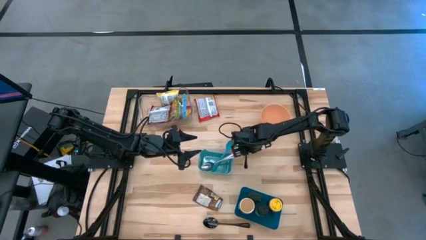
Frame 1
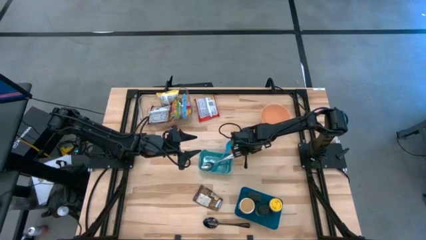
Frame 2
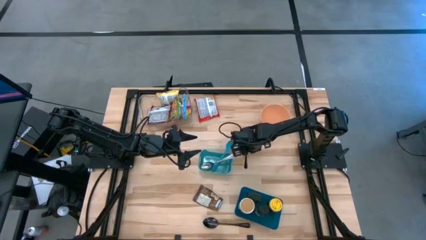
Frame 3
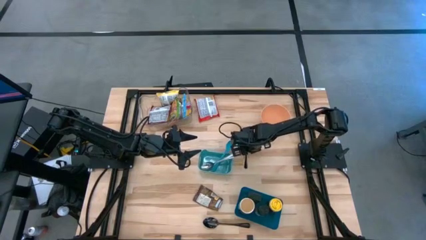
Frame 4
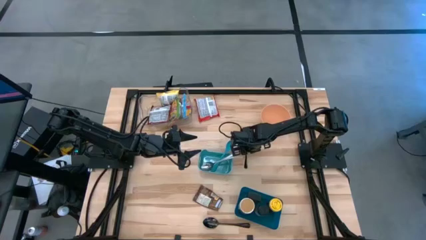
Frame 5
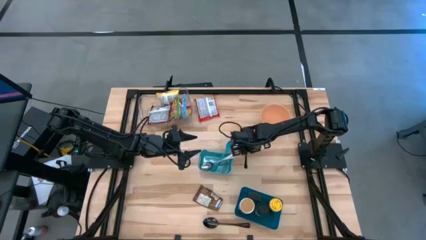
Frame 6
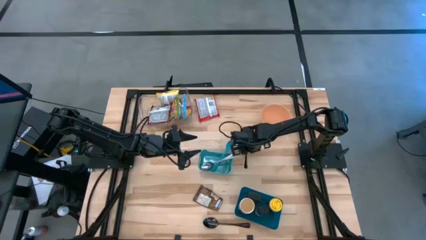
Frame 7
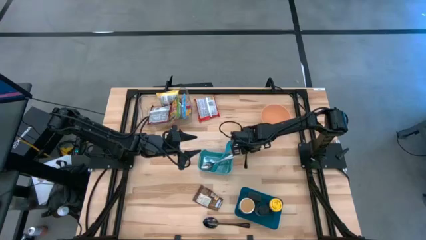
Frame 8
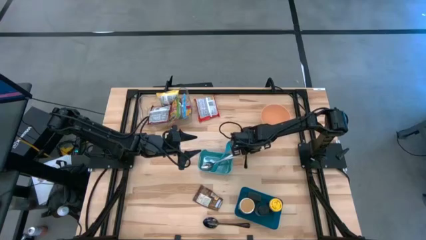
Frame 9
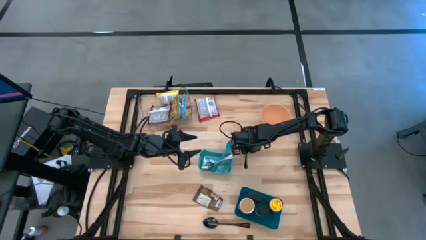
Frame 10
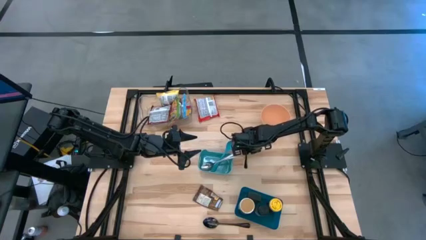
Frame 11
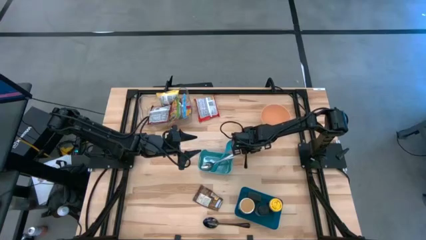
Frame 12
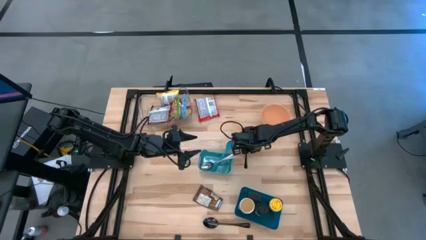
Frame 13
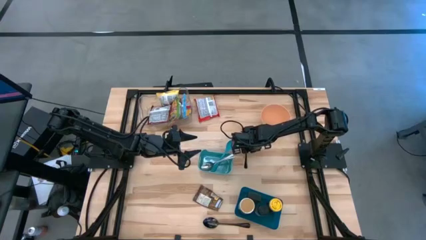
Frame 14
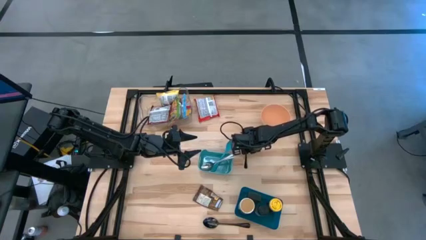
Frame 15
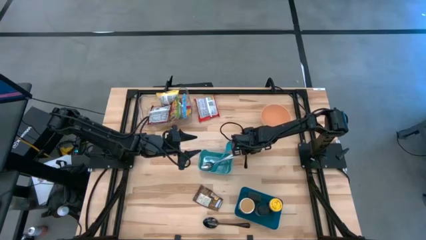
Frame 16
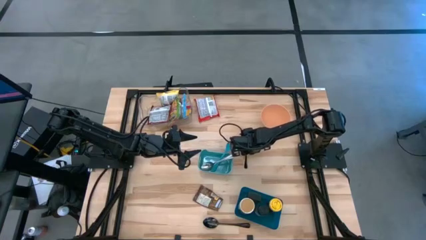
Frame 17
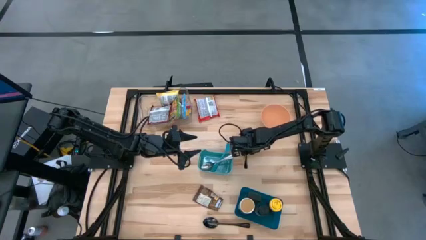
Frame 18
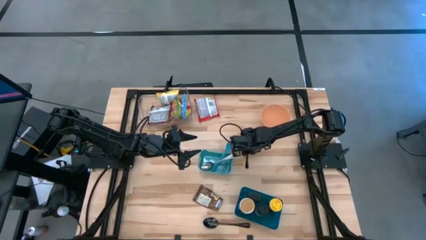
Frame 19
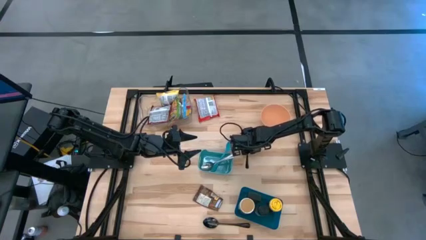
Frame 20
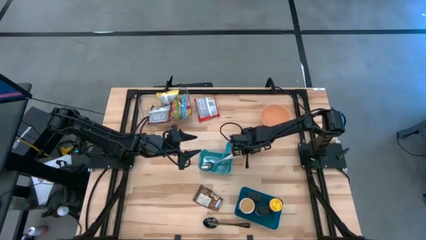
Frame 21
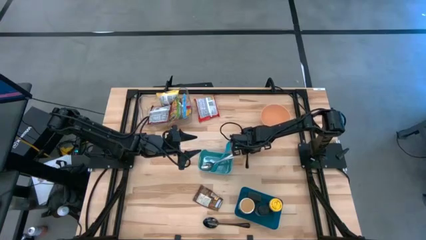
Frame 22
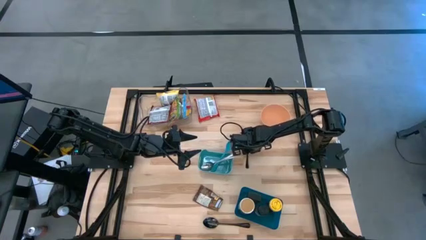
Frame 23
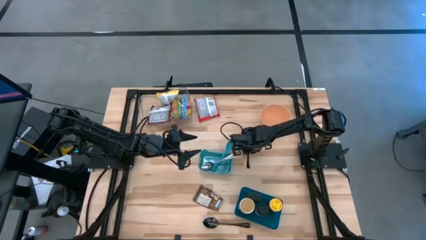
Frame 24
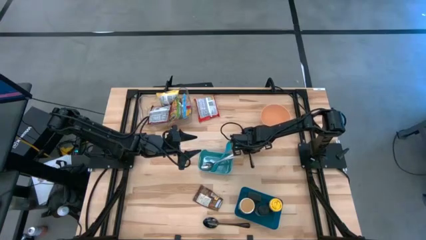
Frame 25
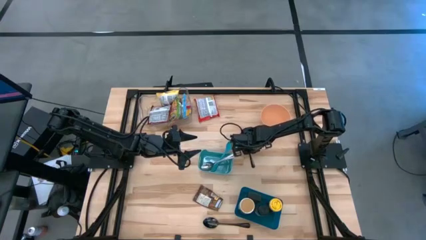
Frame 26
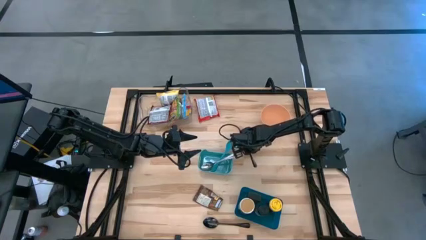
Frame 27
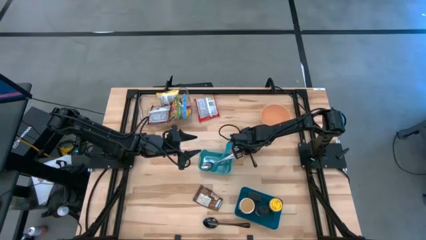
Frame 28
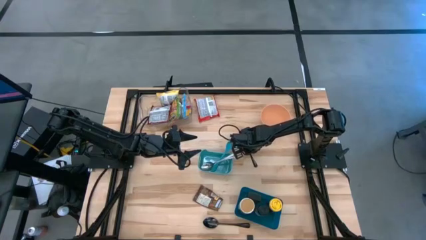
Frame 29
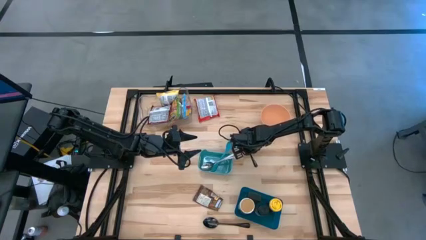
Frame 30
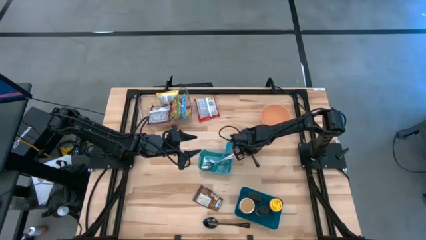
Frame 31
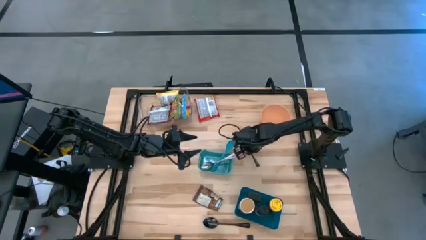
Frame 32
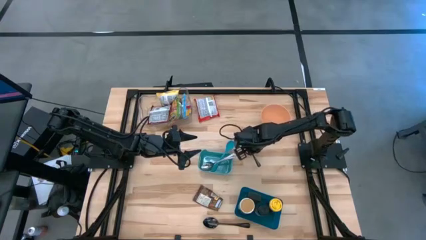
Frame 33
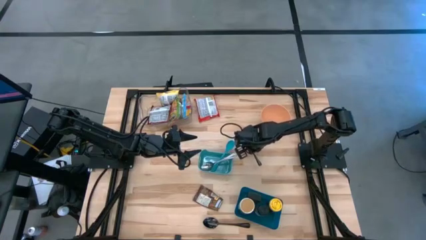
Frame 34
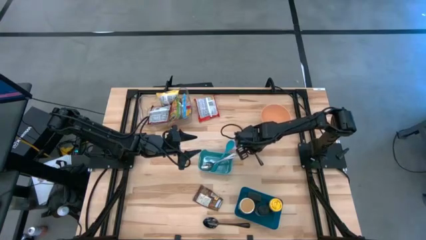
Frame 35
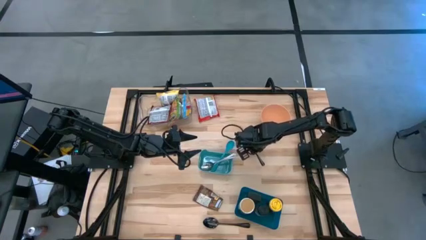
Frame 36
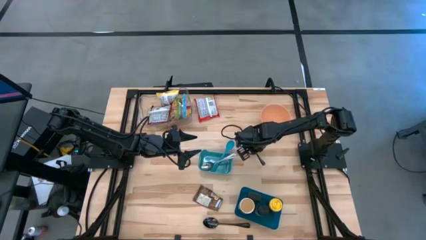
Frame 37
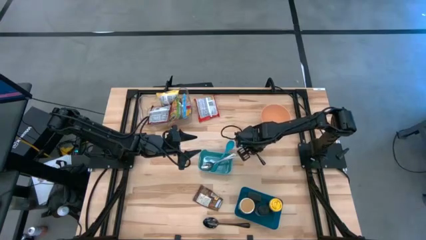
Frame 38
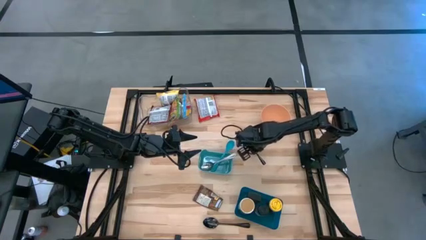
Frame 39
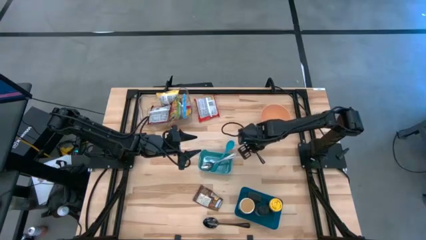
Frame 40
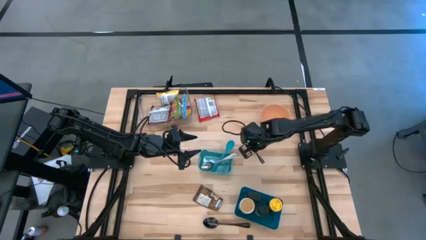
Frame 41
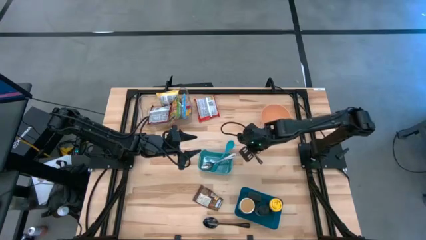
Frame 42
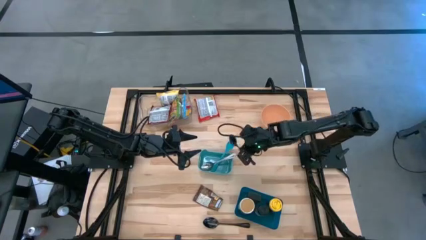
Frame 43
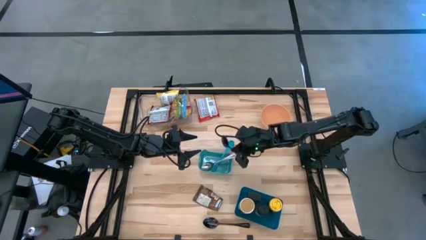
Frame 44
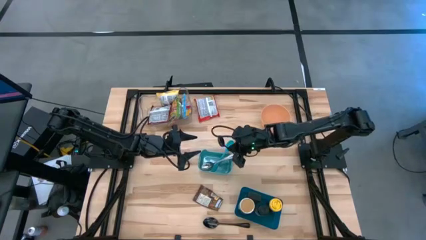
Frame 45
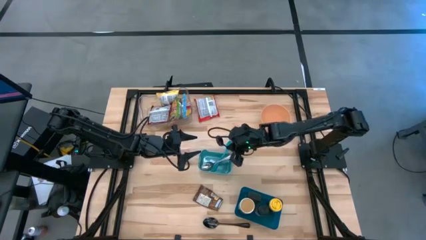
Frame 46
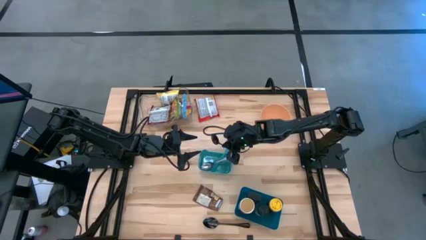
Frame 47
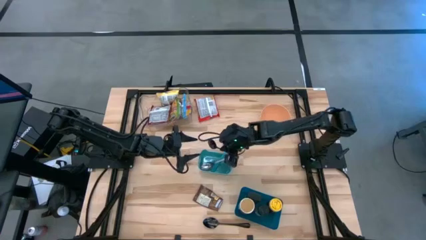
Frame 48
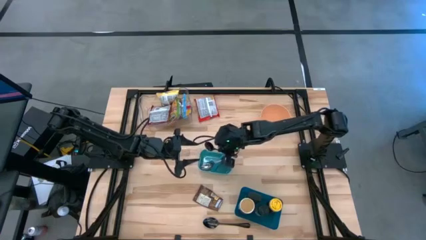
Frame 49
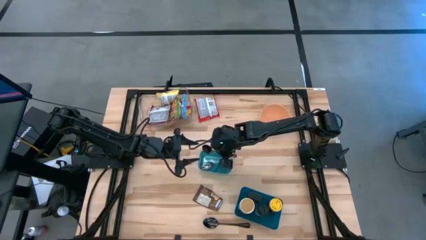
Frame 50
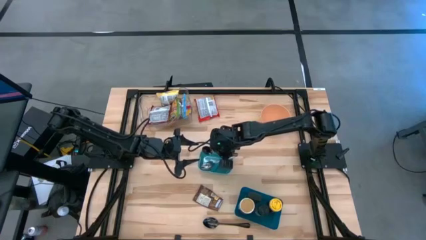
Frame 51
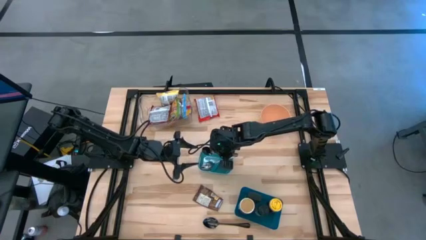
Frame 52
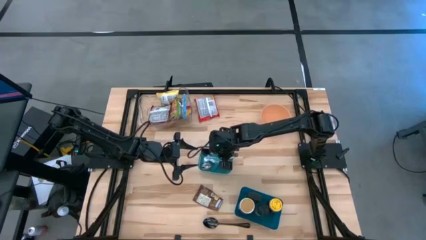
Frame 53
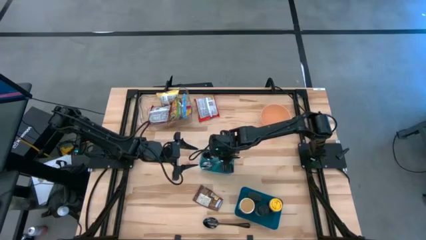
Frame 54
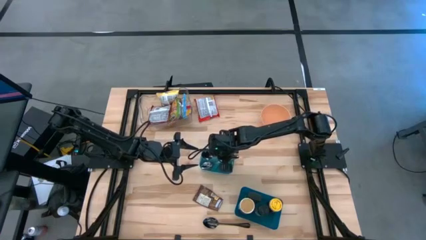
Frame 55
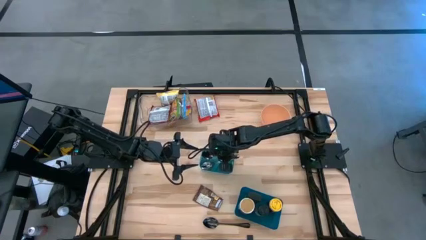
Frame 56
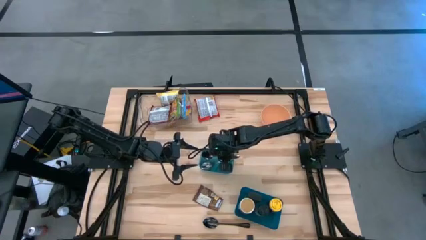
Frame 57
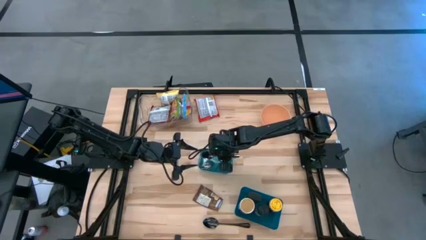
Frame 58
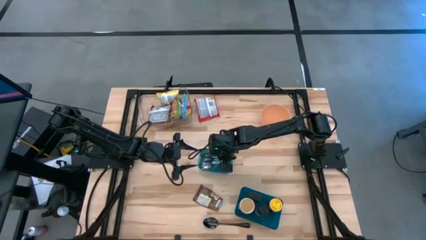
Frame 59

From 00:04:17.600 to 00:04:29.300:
Task: Pick & Place Food Item
Put the top black tablespoon into the green bin
